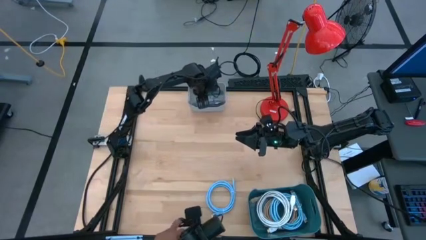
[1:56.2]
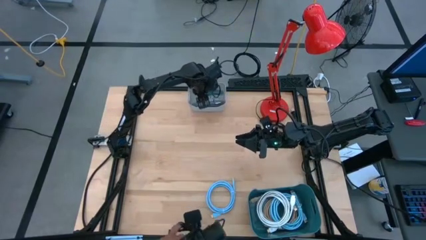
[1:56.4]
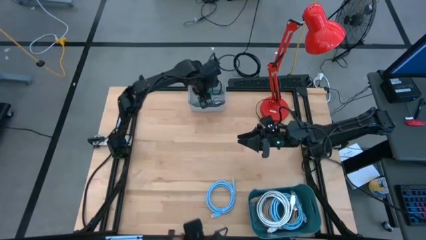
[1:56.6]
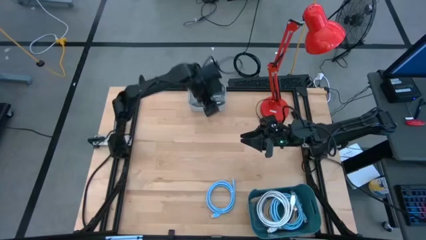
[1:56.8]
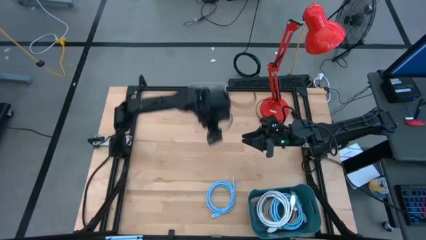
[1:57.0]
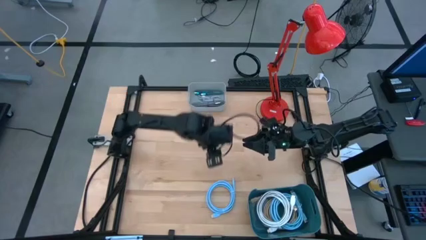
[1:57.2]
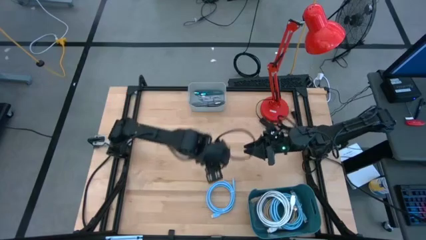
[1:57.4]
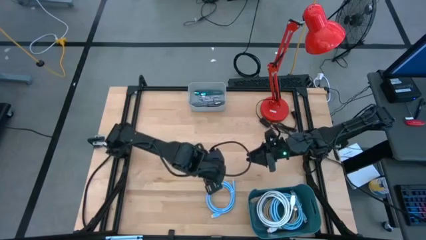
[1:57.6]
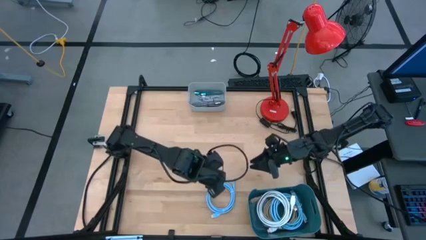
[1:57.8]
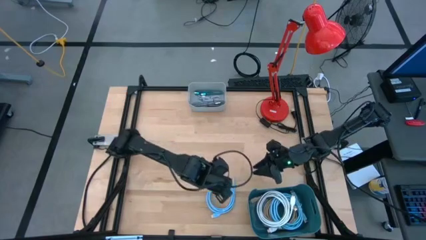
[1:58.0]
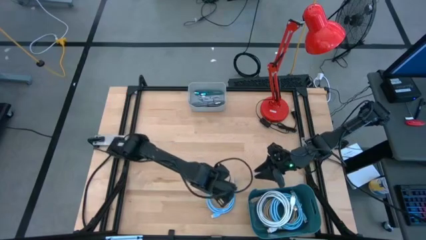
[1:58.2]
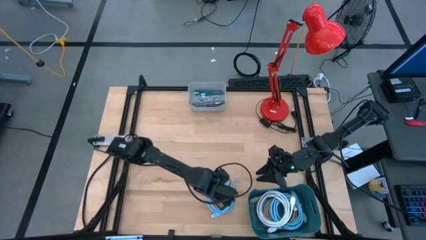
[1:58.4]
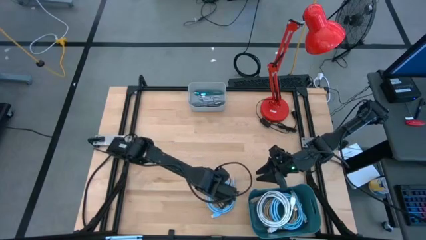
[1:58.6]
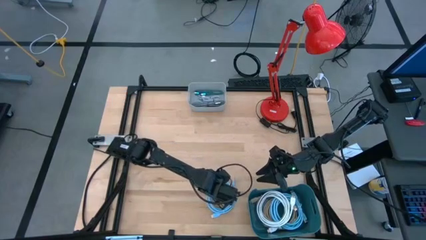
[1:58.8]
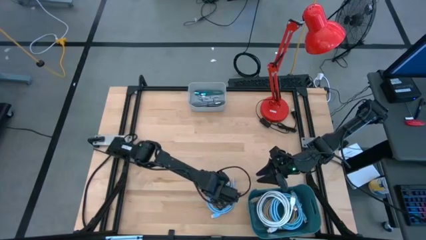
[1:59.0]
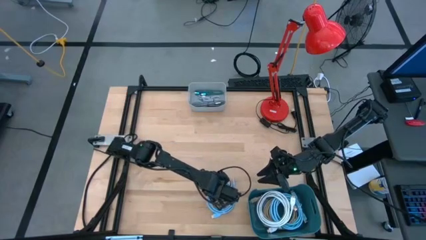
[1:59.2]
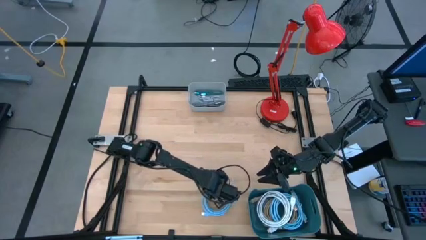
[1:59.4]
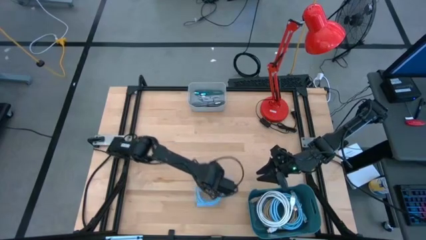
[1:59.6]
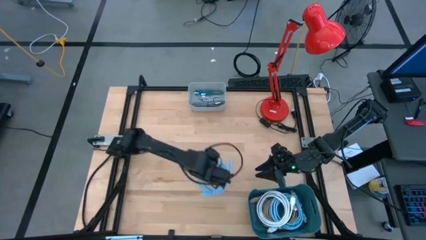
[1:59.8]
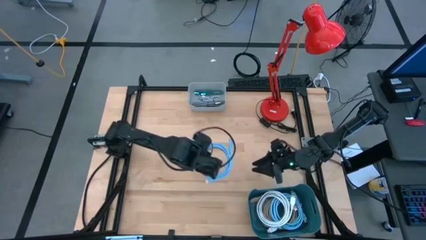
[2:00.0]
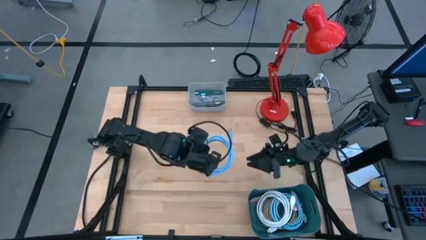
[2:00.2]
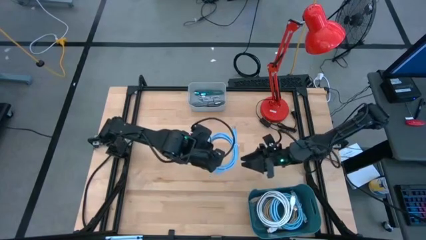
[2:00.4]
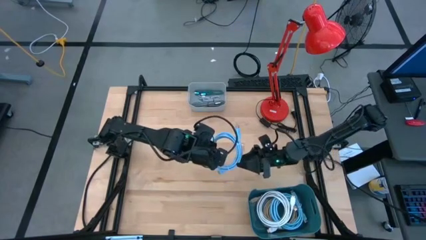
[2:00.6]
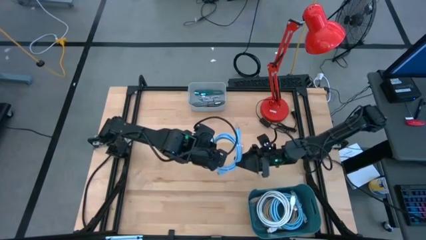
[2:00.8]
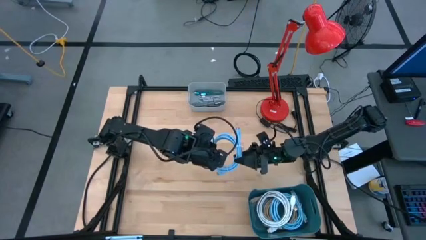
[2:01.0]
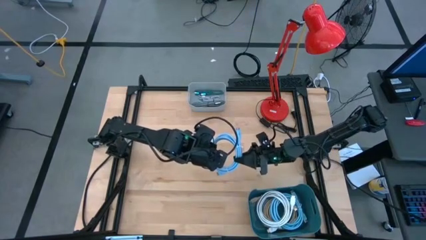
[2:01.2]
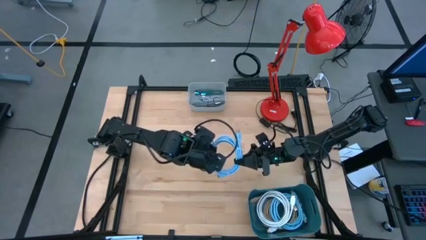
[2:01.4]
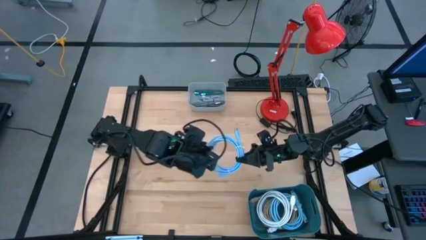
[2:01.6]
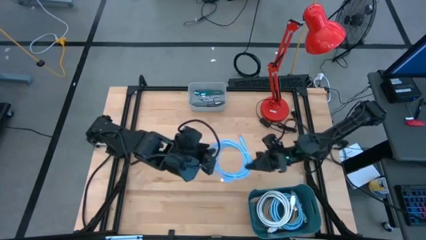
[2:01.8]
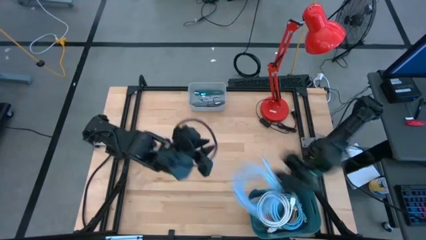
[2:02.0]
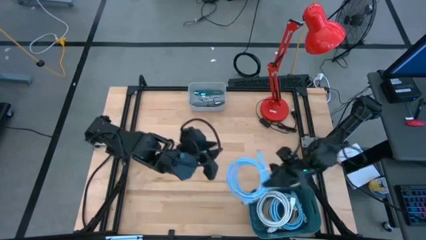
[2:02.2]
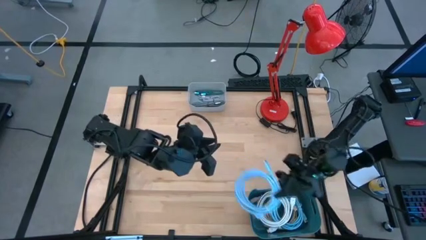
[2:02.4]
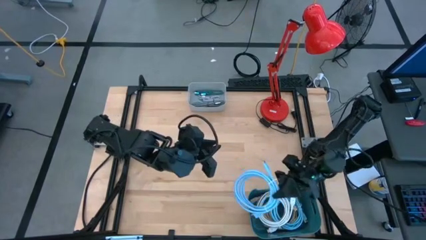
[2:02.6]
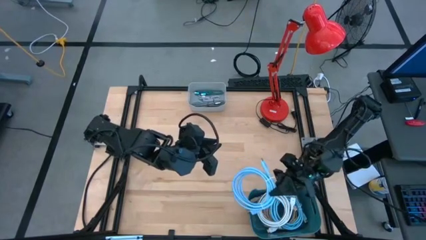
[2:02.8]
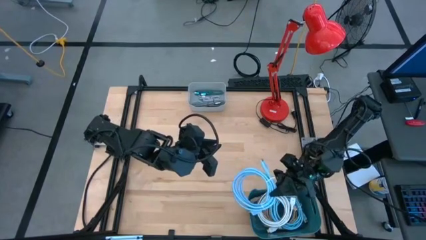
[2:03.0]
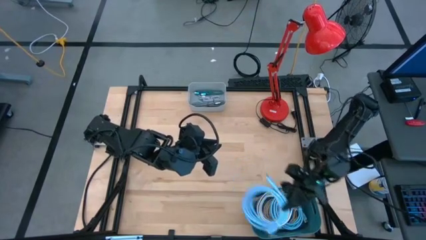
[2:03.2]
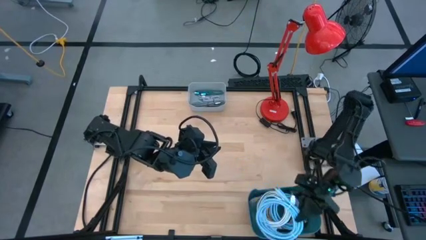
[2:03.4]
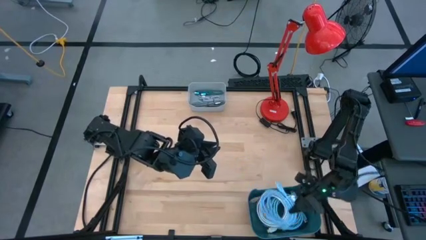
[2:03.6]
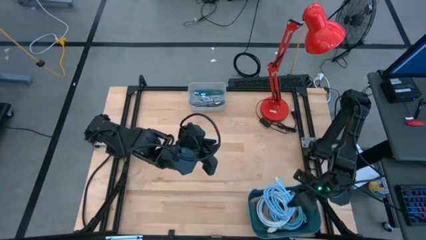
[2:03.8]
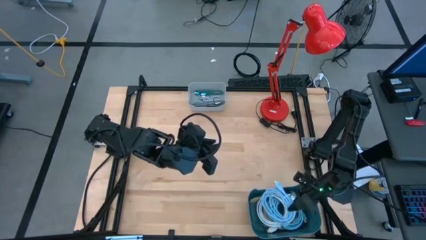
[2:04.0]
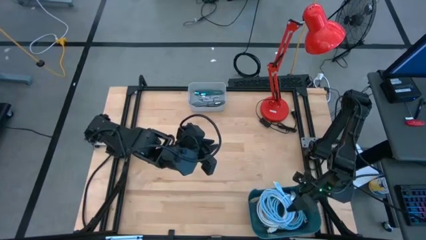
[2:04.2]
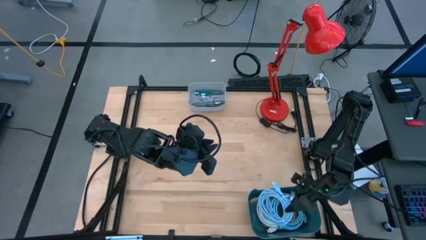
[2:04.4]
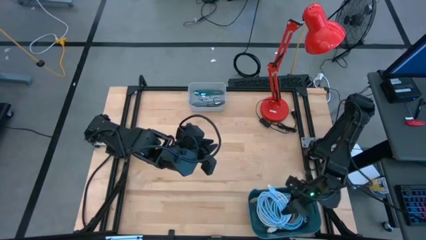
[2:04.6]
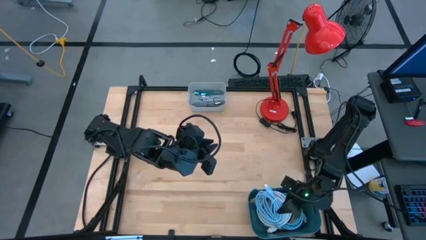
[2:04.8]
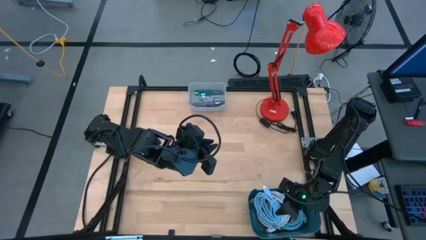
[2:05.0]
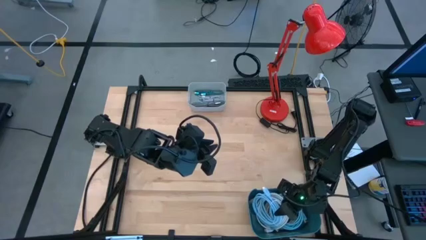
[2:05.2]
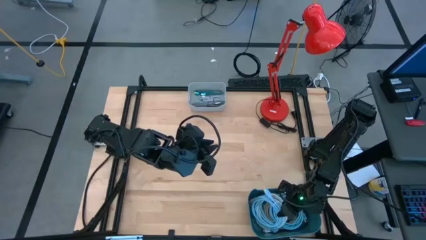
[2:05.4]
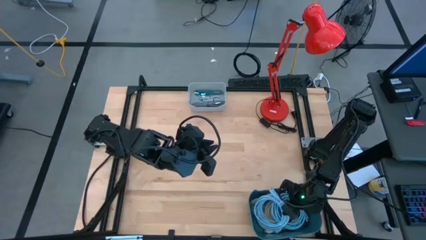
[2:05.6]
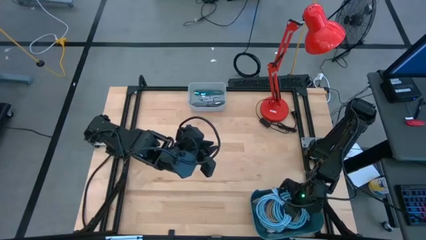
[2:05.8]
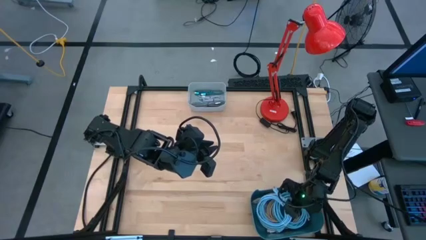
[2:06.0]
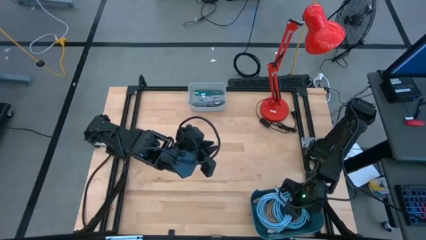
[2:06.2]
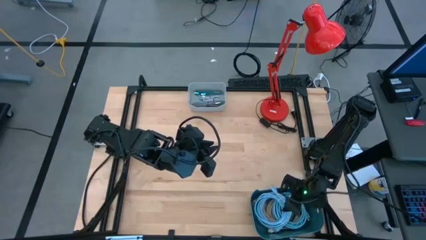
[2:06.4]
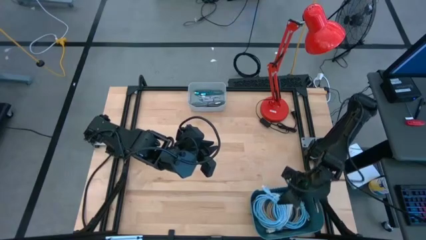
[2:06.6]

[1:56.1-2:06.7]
Task: Pick & Place USB Port
Put the blue hdmi cable into the blue bin

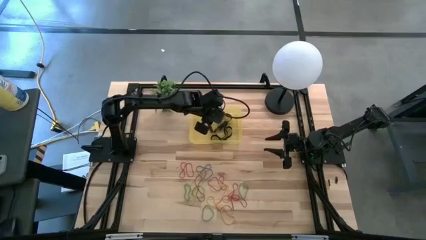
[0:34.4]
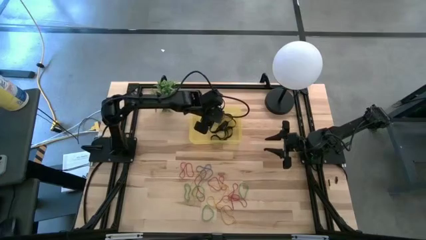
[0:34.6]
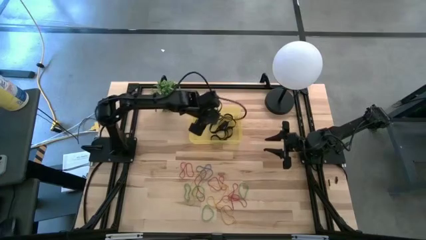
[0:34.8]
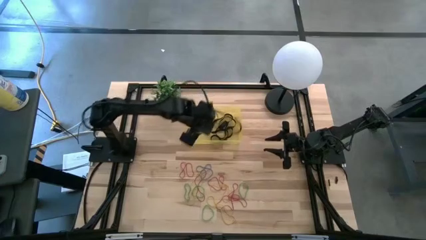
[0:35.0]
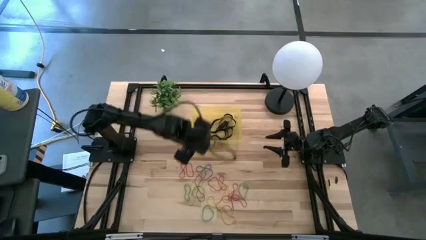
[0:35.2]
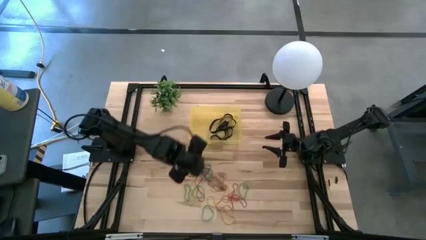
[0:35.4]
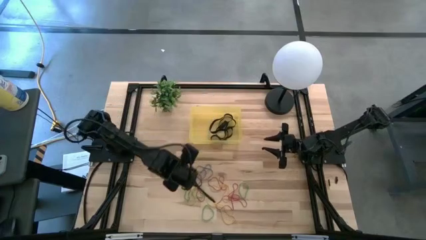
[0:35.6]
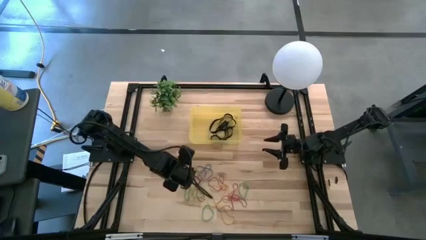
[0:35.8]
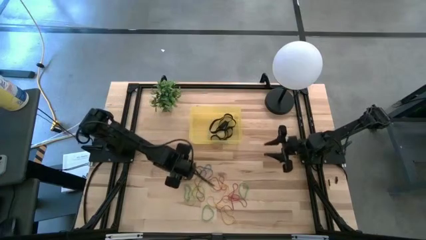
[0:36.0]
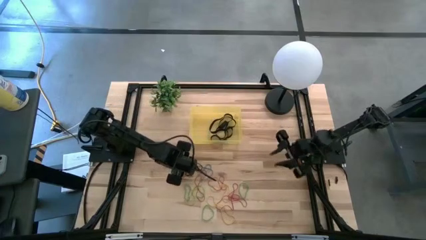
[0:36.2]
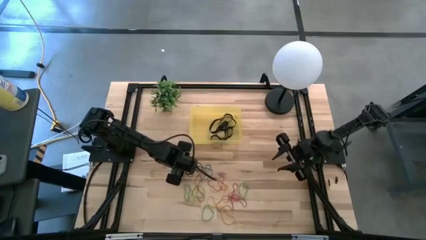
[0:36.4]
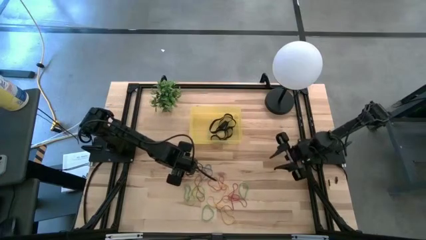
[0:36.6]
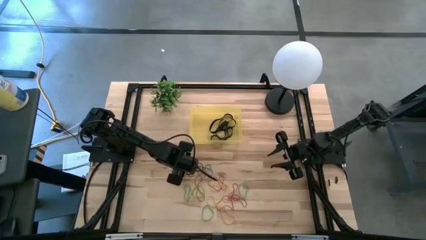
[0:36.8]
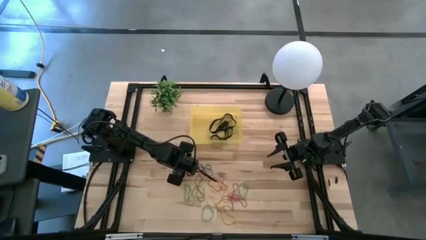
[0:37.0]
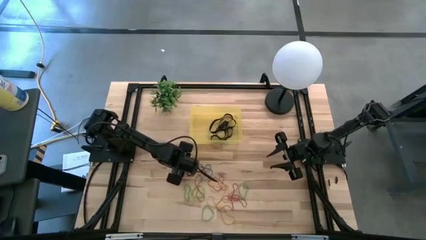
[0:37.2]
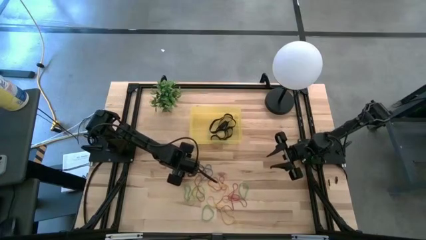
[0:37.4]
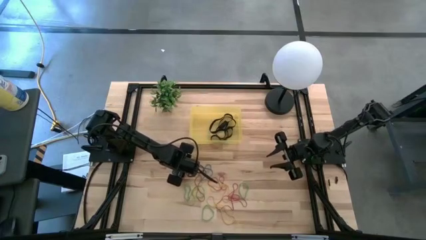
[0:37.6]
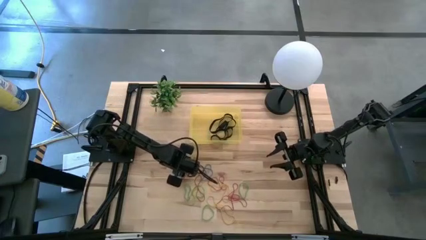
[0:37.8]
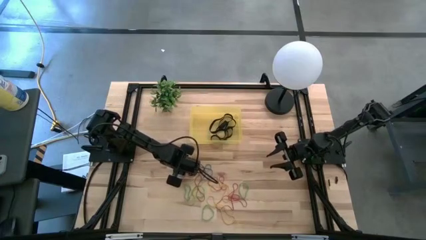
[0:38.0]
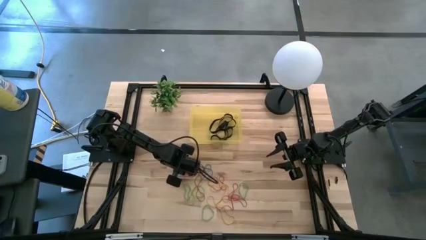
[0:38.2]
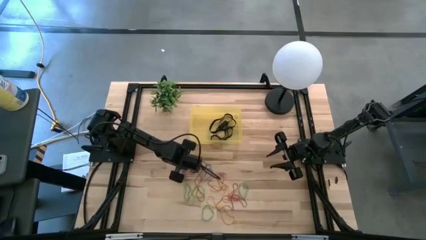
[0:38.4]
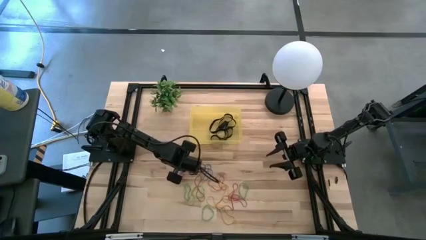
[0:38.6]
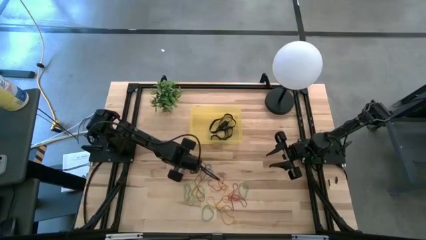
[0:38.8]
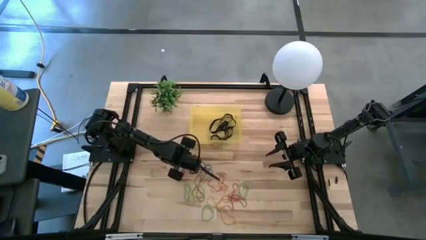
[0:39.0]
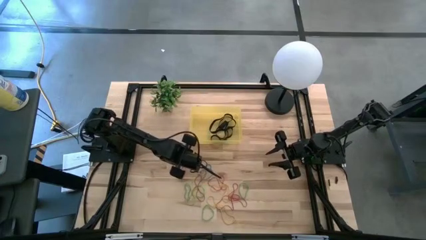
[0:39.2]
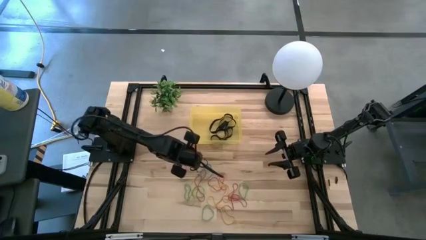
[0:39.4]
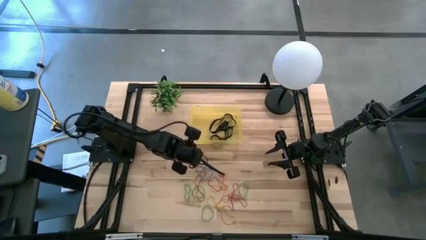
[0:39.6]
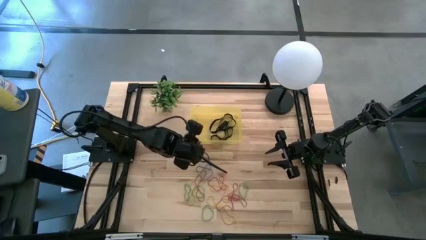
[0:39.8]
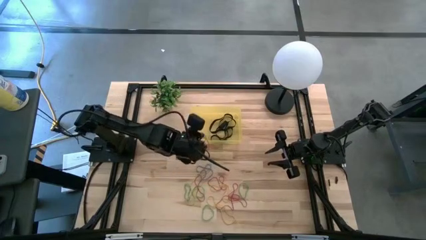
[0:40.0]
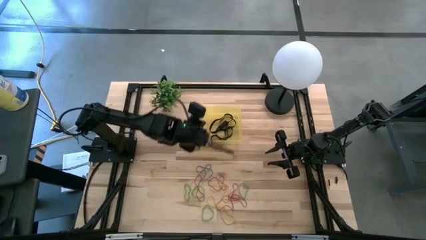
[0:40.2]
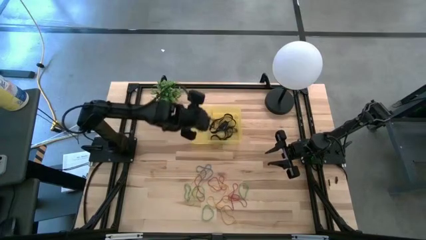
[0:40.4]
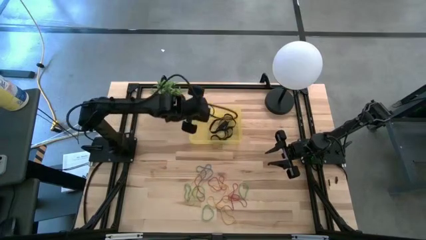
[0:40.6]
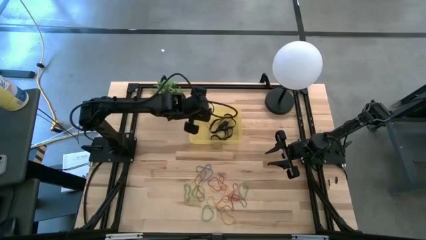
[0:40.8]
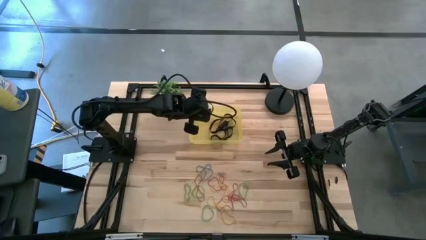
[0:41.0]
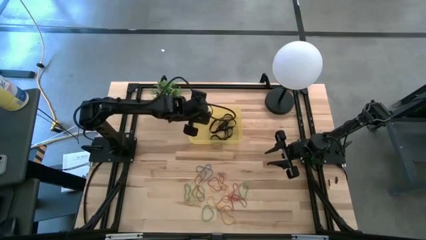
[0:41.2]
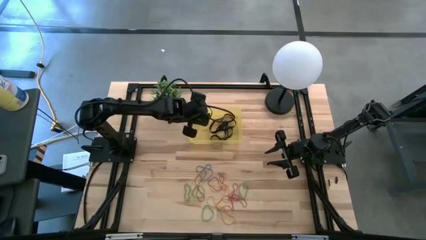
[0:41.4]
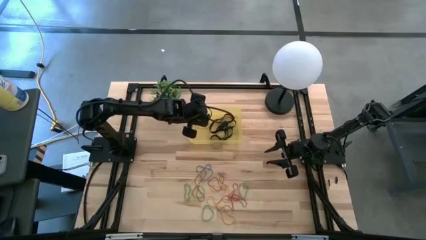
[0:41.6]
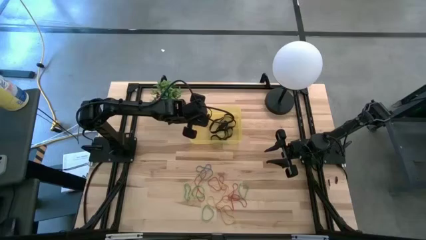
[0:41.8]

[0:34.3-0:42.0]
Task: Pick and place rubber bands into bin
Put the red rubber band into the yellow bin
